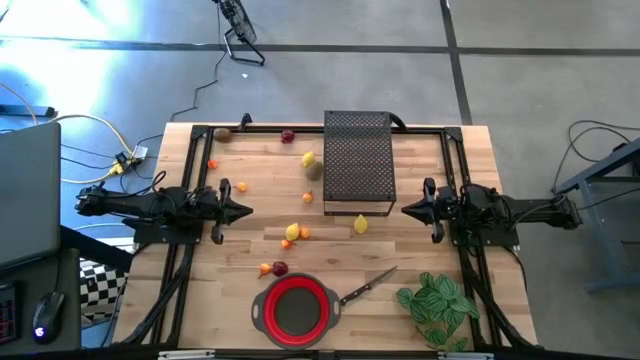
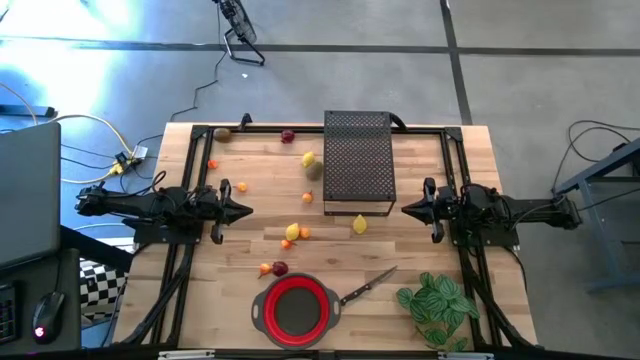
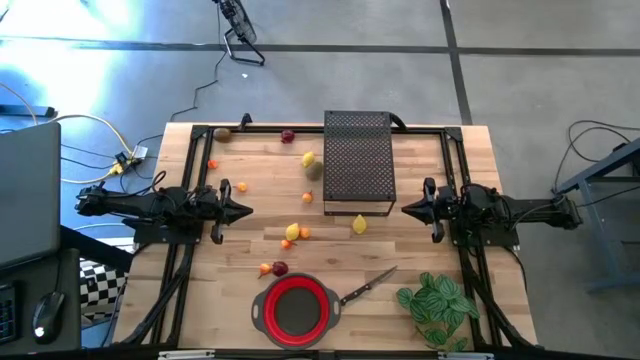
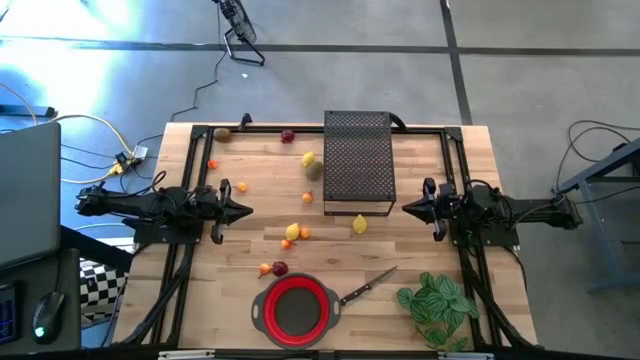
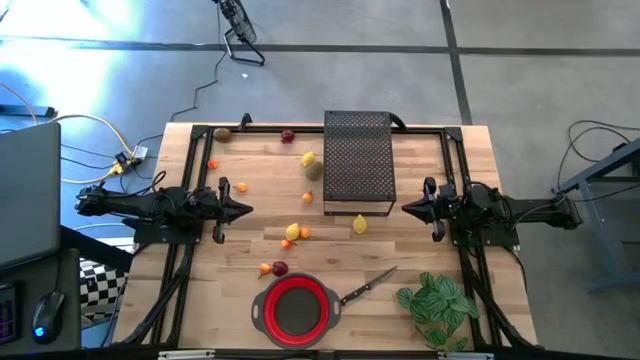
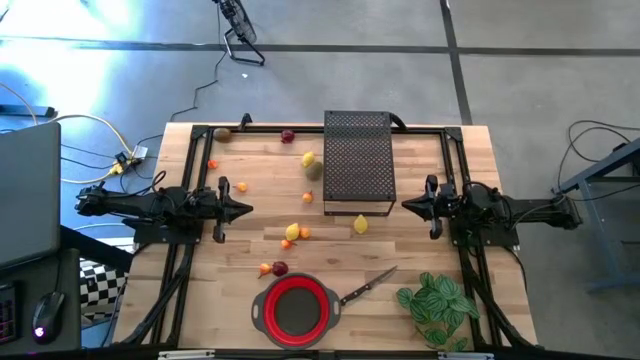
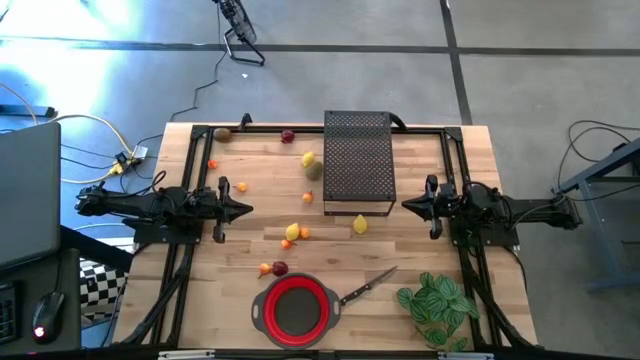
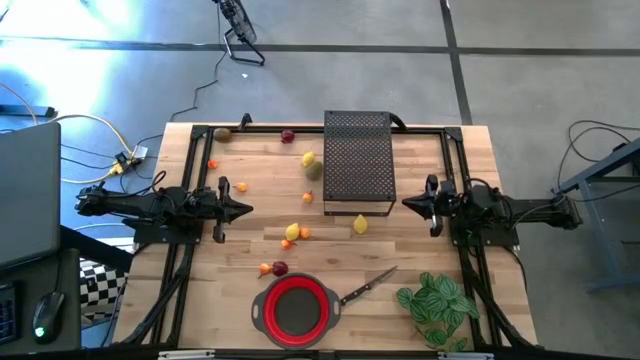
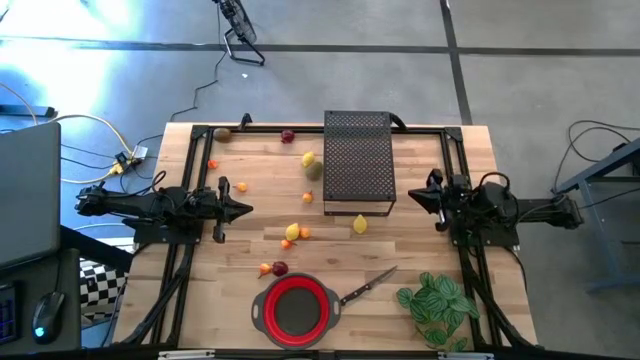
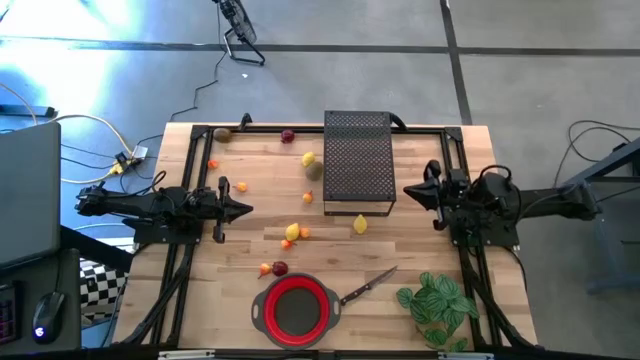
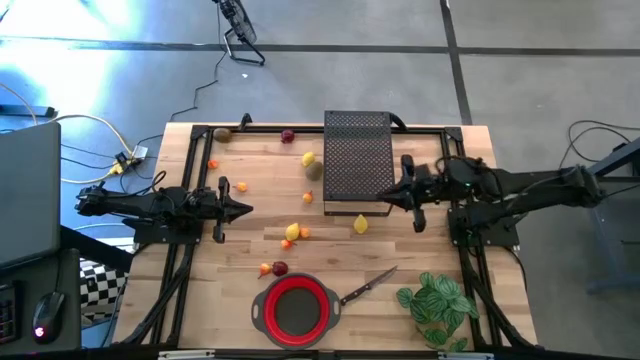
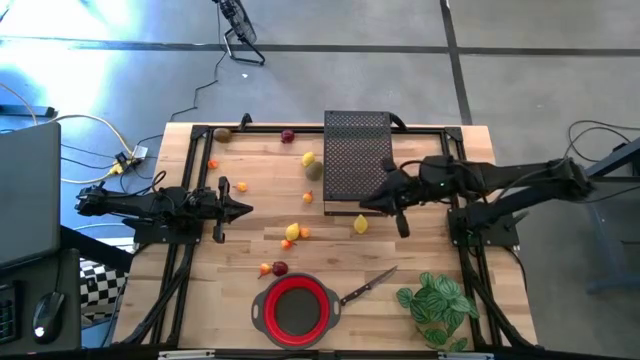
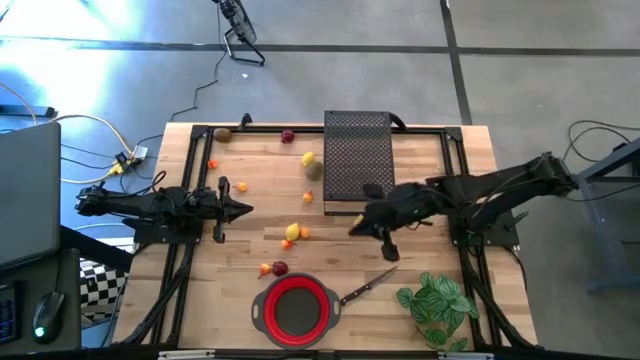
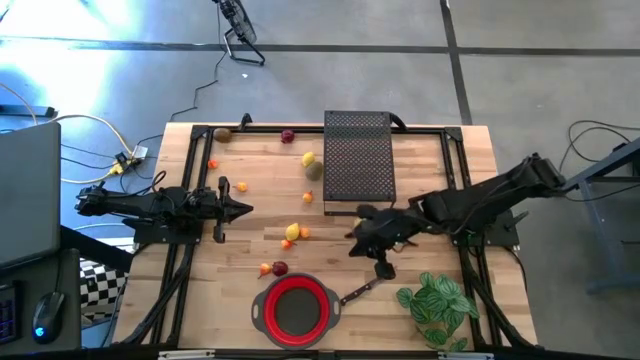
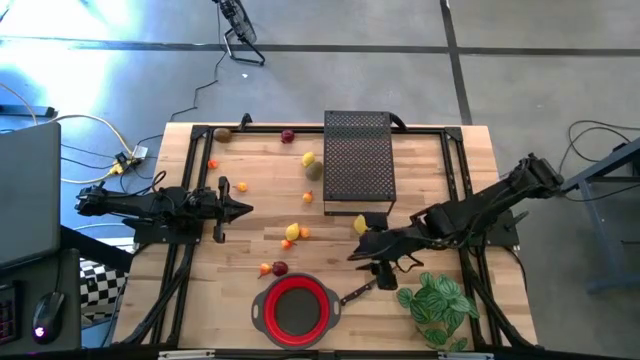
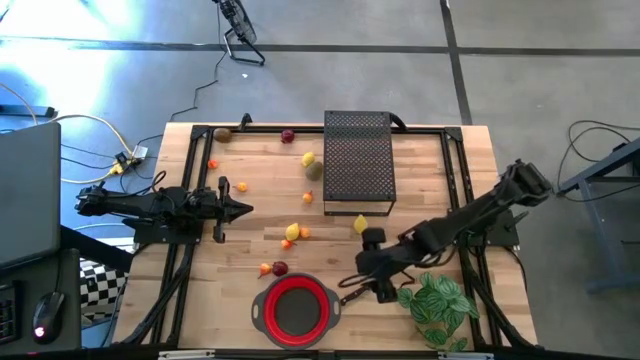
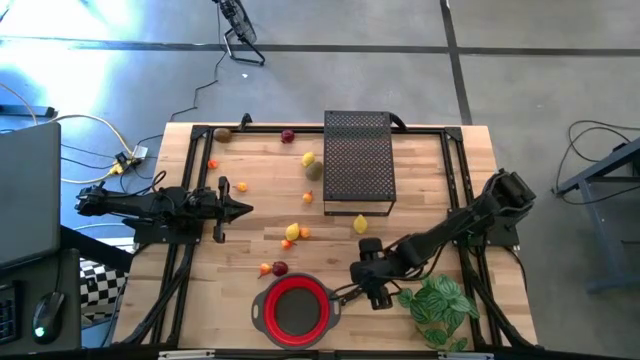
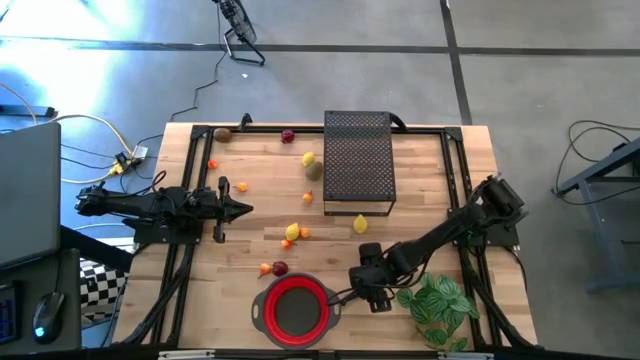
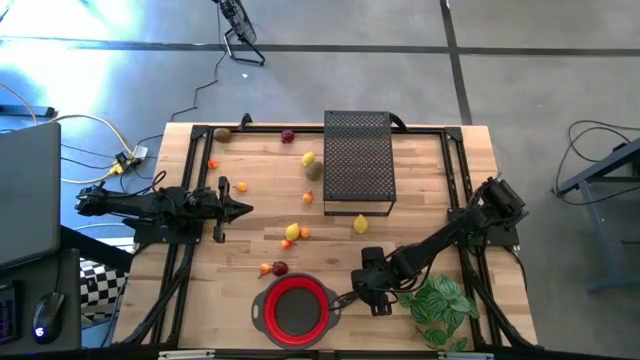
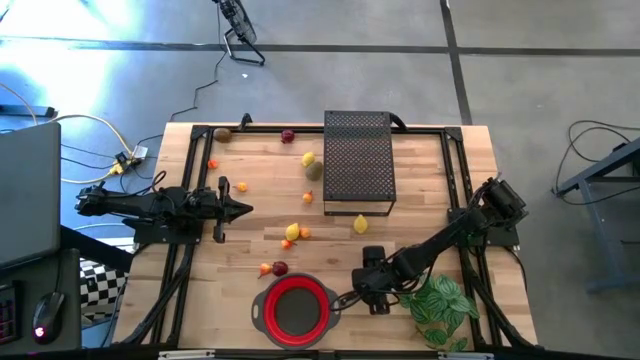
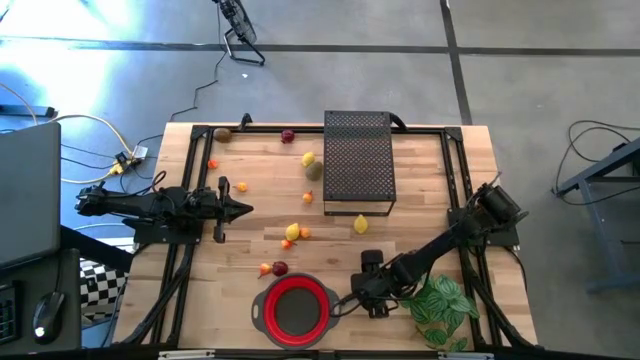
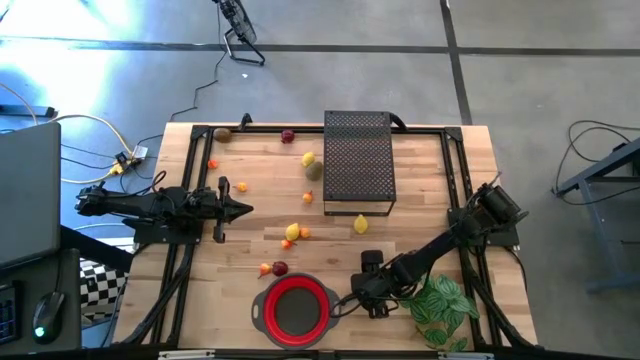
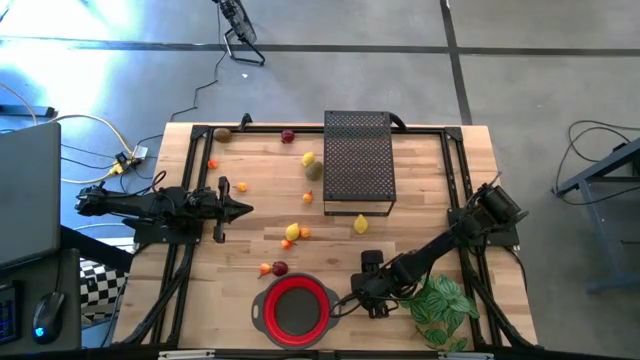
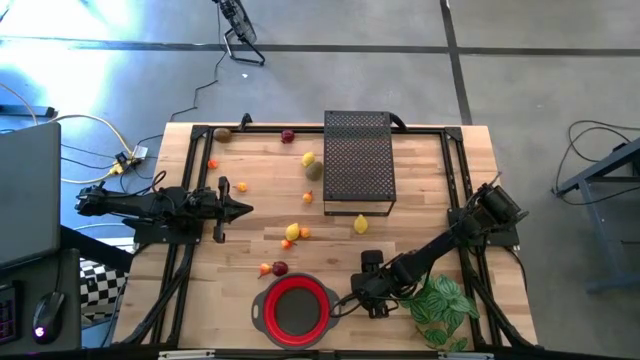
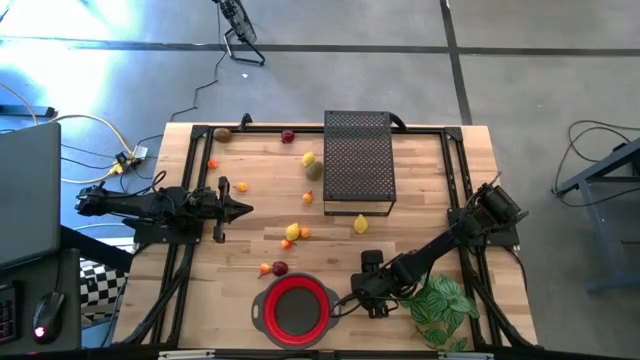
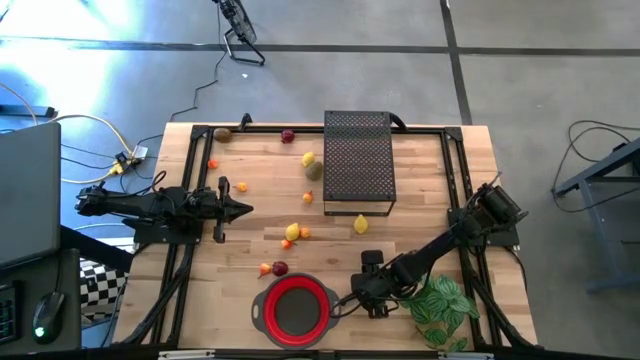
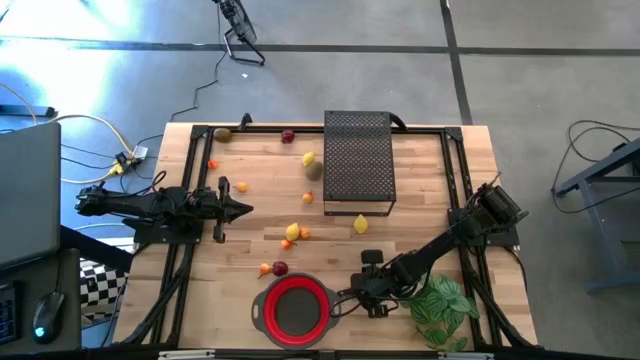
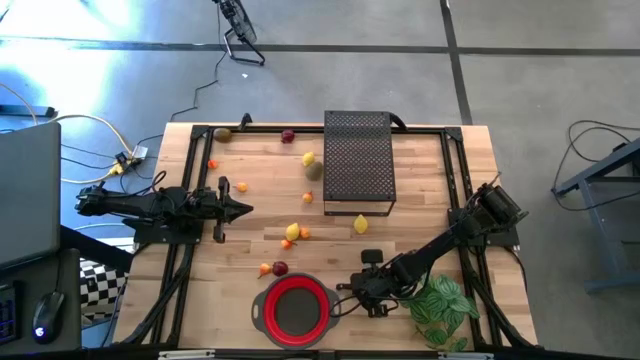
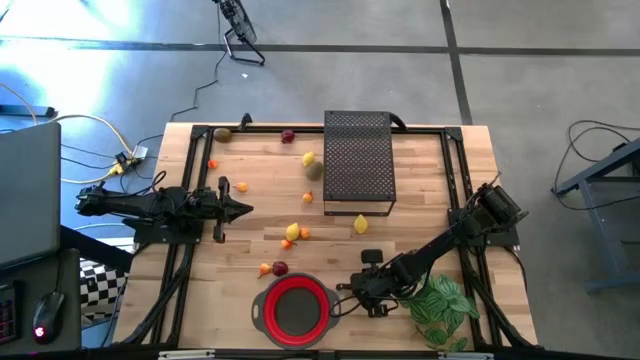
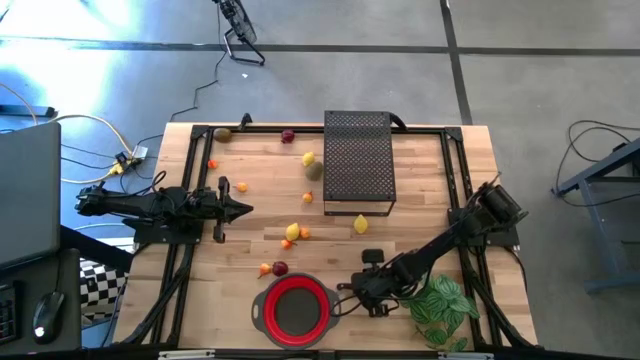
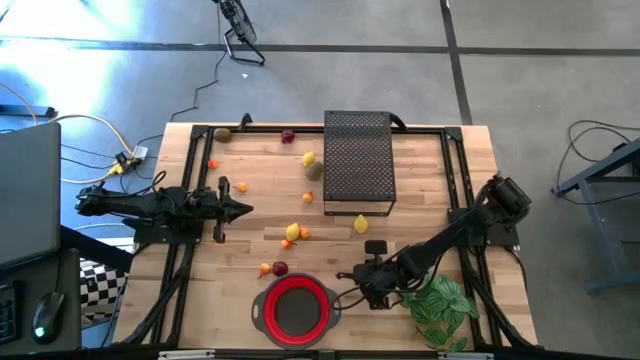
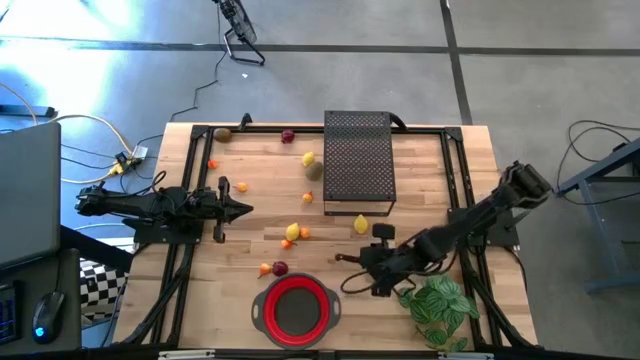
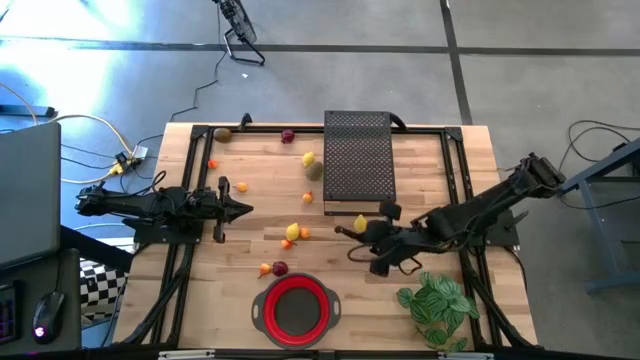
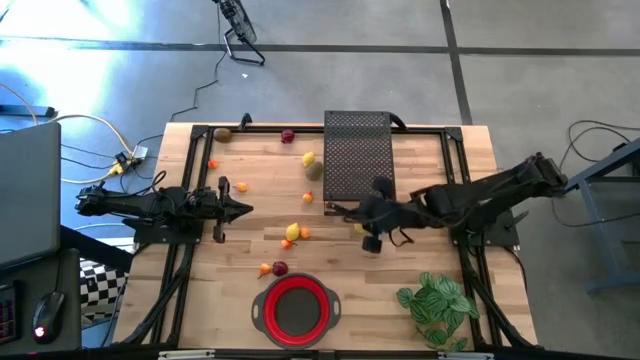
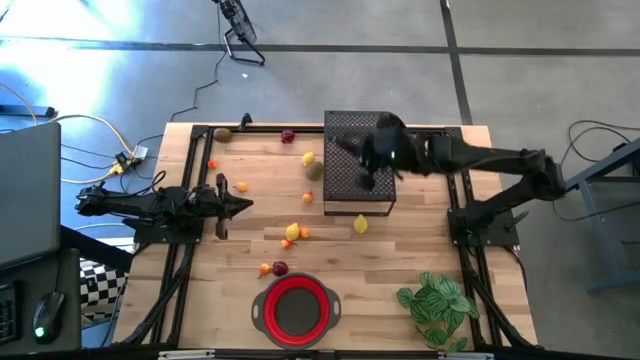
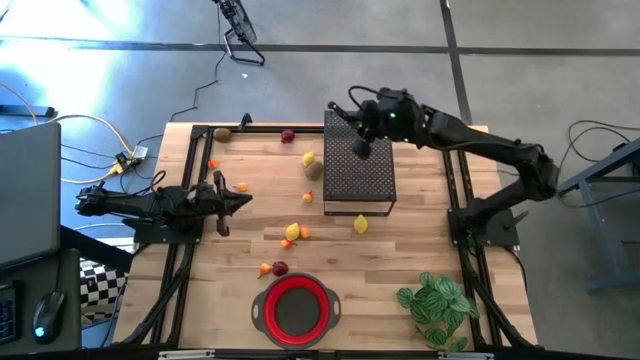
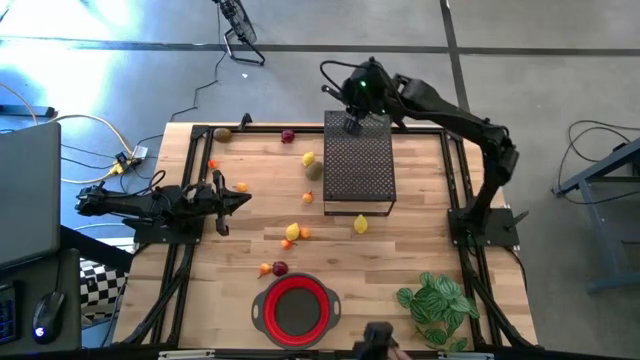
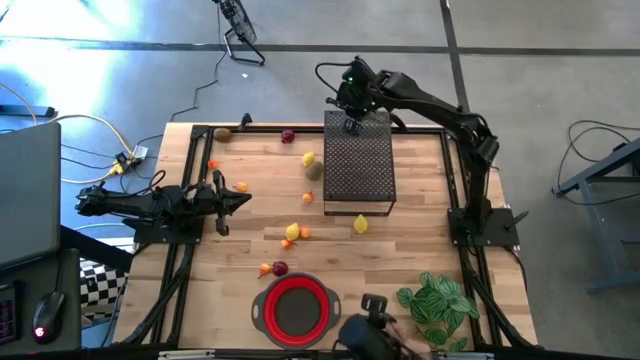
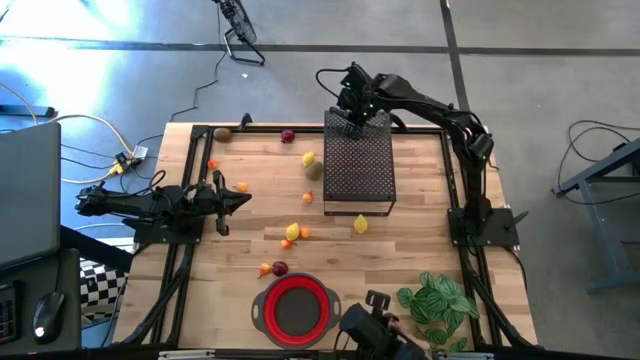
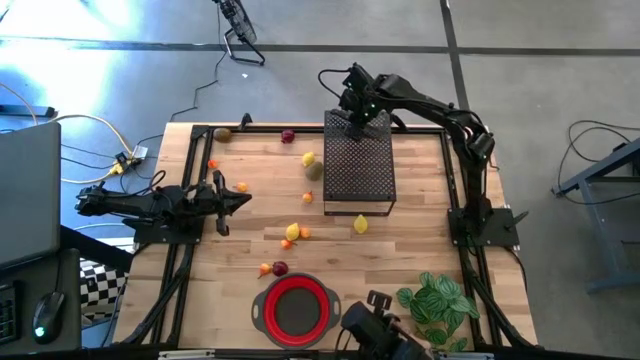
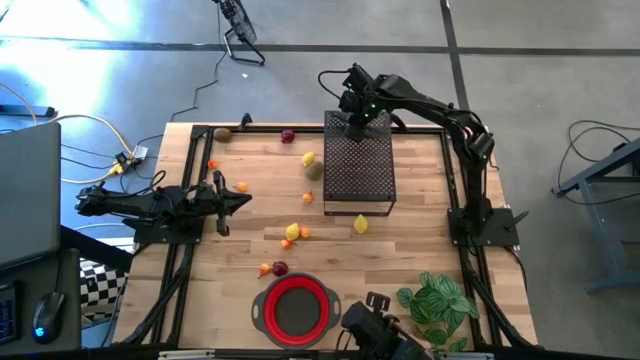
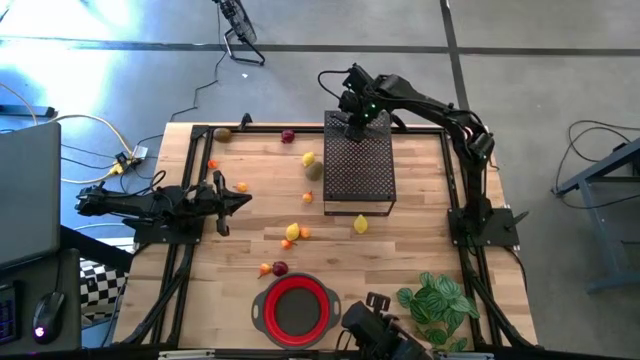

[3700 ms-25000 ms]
Task: Pick & Place Fruit
Put the black knife on the shelf
